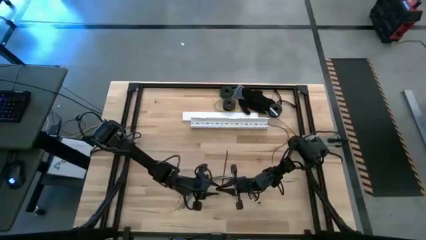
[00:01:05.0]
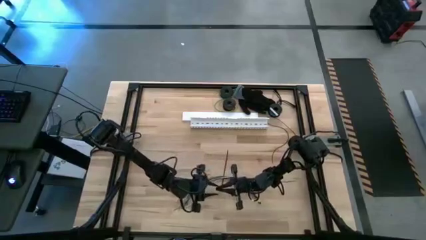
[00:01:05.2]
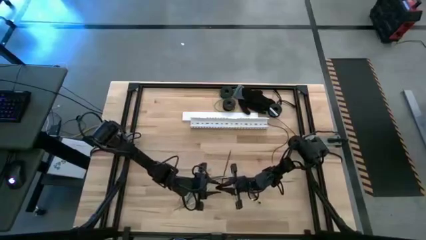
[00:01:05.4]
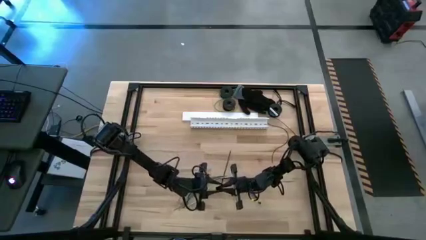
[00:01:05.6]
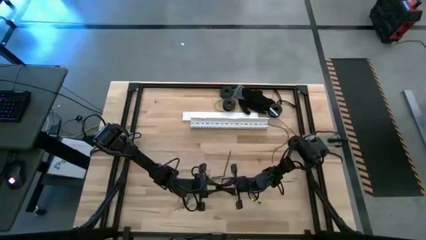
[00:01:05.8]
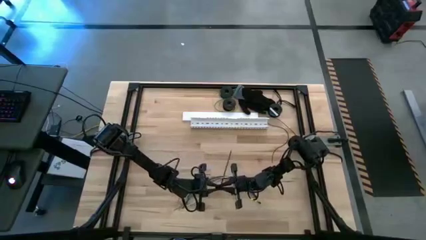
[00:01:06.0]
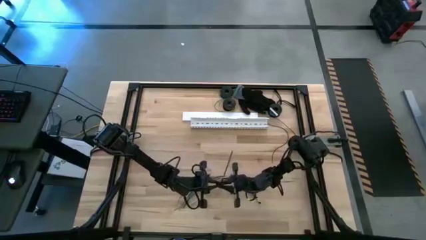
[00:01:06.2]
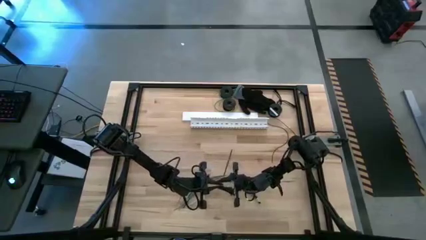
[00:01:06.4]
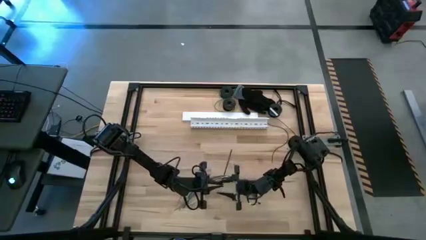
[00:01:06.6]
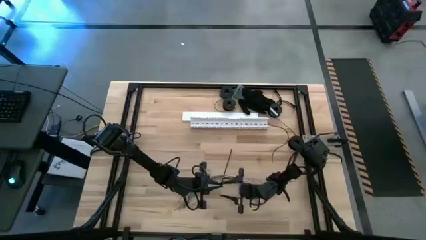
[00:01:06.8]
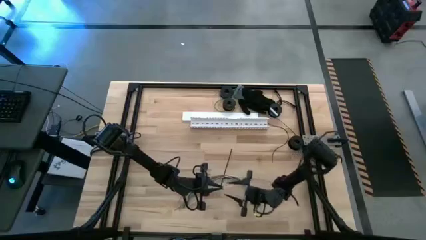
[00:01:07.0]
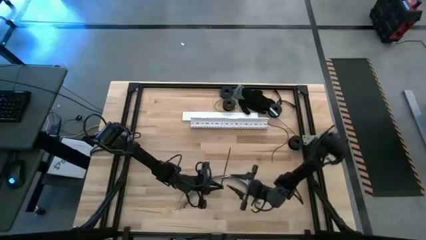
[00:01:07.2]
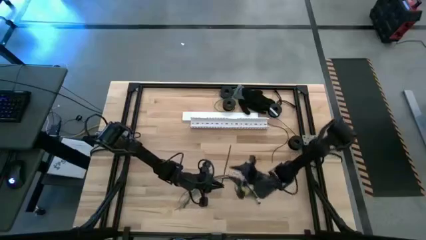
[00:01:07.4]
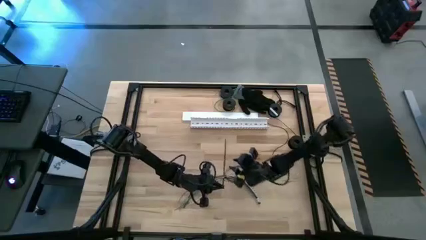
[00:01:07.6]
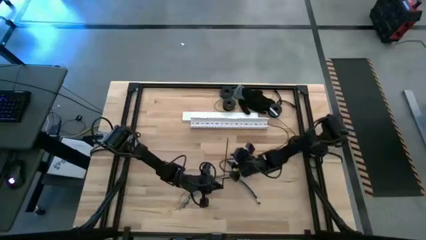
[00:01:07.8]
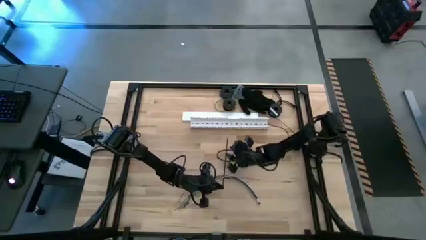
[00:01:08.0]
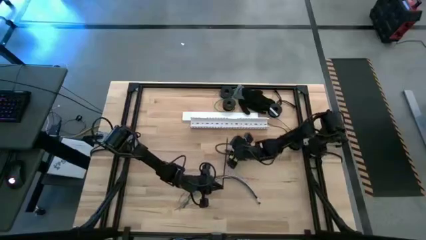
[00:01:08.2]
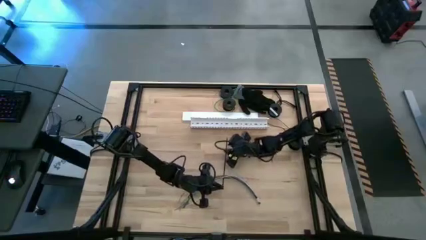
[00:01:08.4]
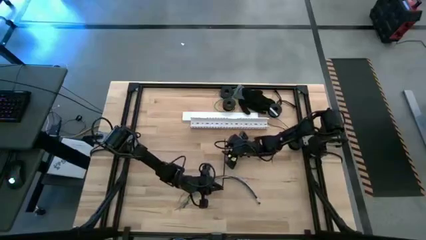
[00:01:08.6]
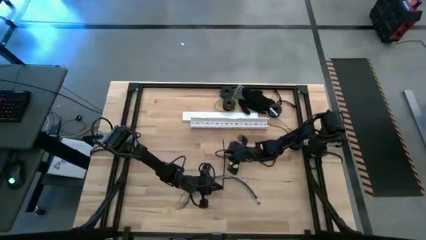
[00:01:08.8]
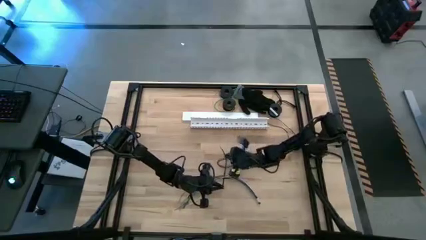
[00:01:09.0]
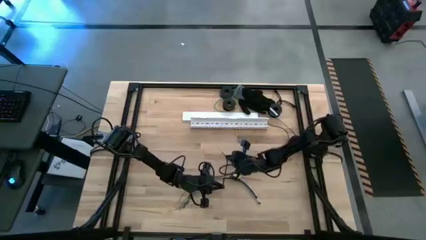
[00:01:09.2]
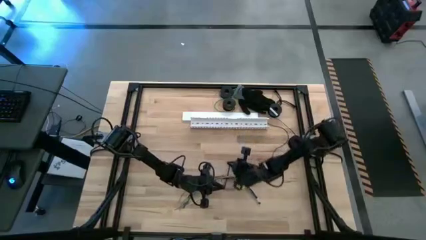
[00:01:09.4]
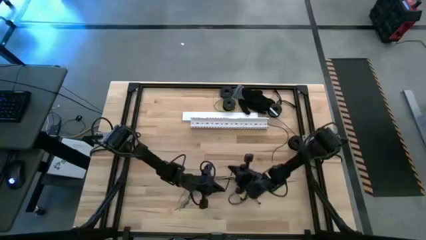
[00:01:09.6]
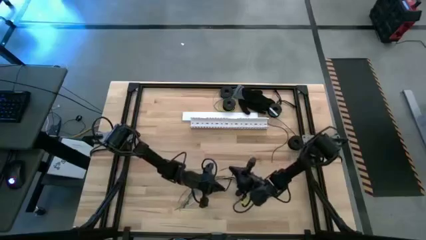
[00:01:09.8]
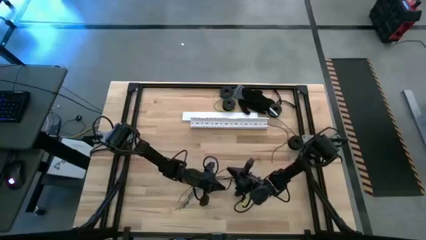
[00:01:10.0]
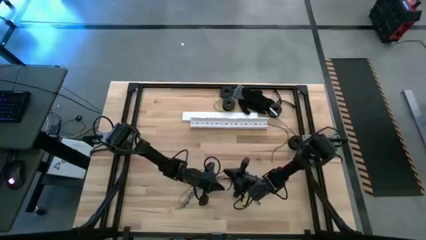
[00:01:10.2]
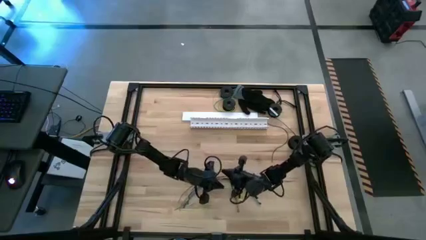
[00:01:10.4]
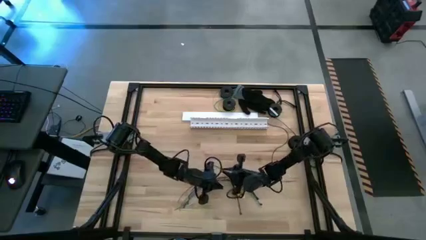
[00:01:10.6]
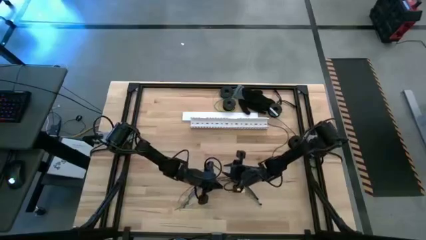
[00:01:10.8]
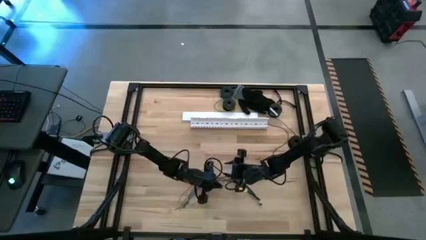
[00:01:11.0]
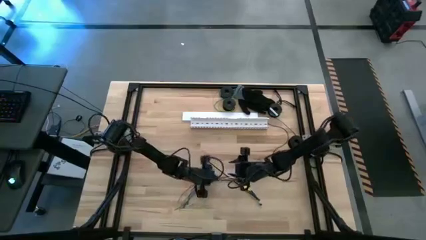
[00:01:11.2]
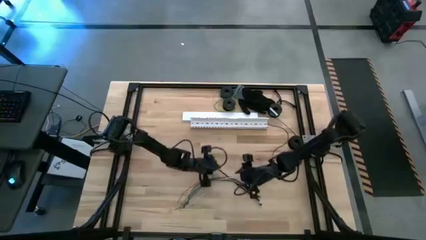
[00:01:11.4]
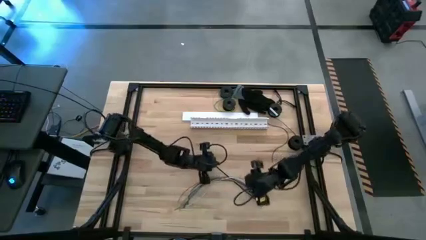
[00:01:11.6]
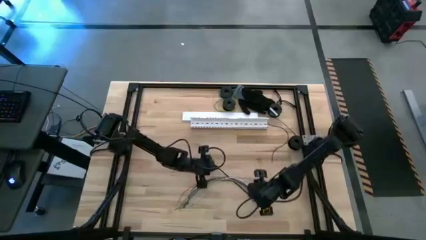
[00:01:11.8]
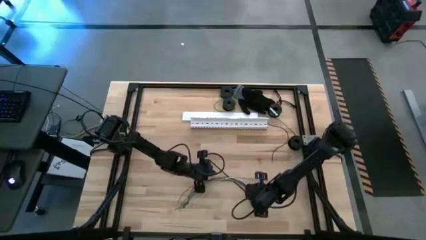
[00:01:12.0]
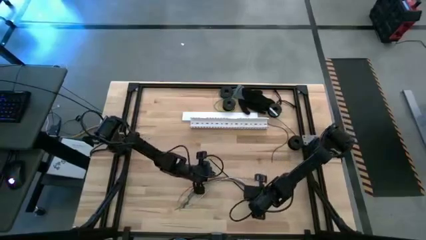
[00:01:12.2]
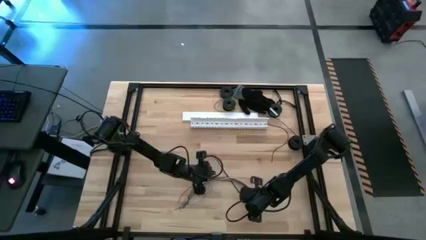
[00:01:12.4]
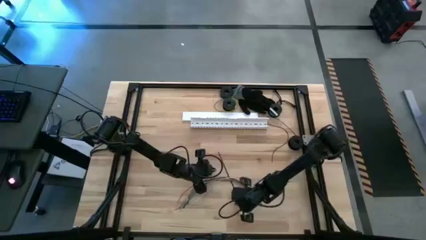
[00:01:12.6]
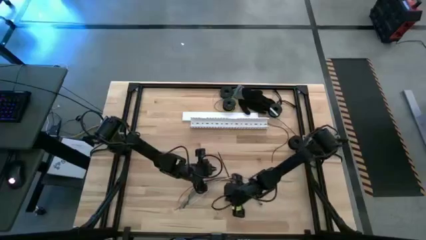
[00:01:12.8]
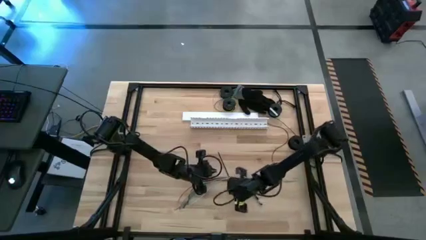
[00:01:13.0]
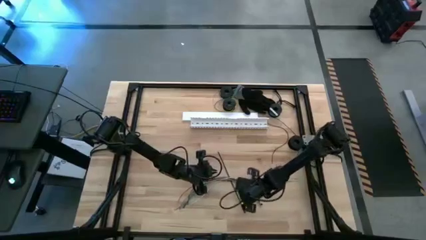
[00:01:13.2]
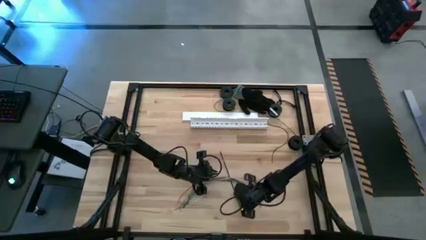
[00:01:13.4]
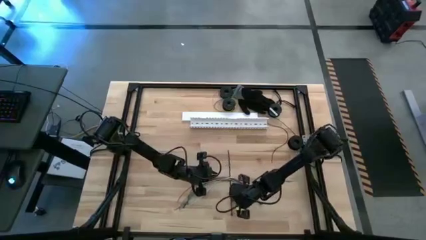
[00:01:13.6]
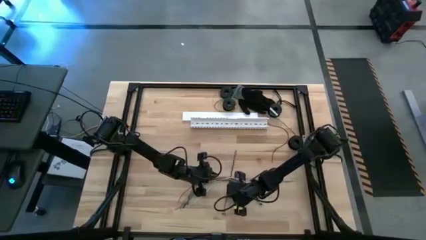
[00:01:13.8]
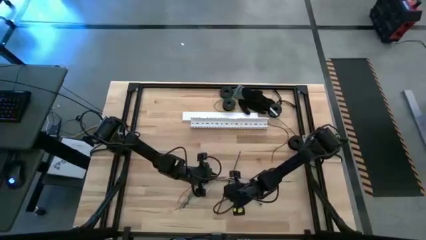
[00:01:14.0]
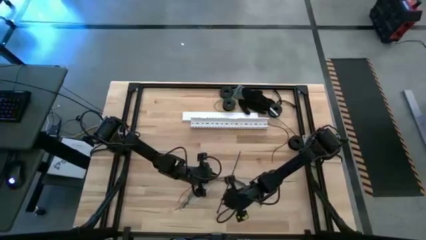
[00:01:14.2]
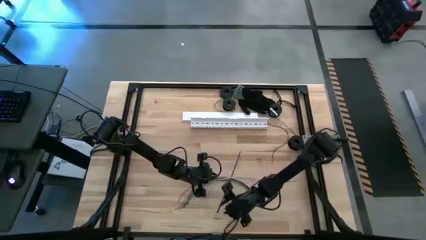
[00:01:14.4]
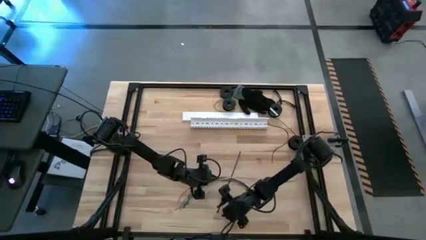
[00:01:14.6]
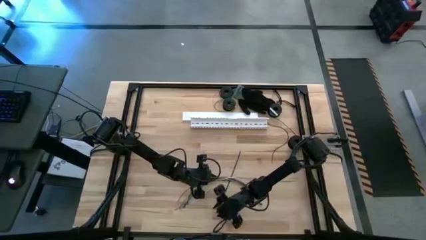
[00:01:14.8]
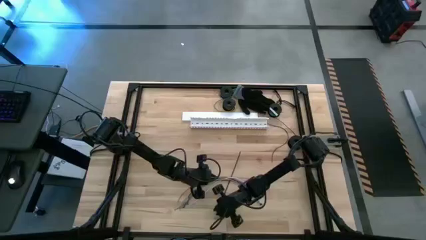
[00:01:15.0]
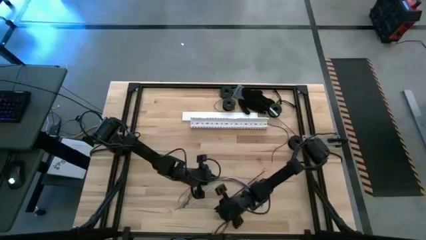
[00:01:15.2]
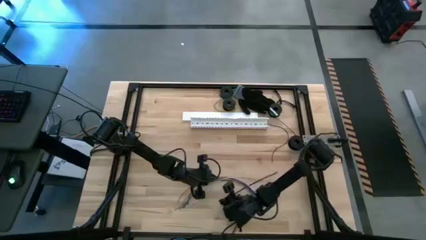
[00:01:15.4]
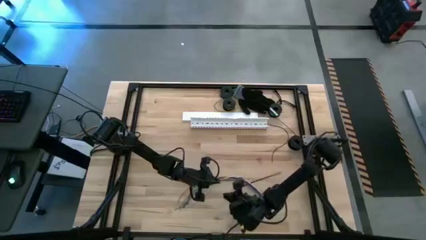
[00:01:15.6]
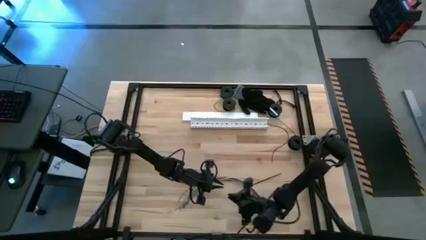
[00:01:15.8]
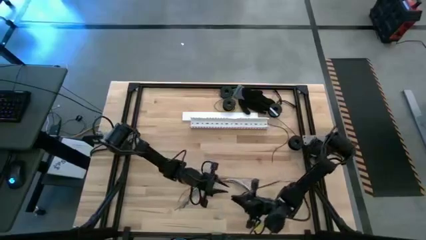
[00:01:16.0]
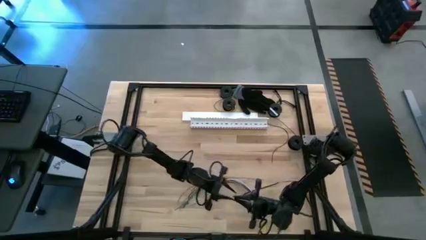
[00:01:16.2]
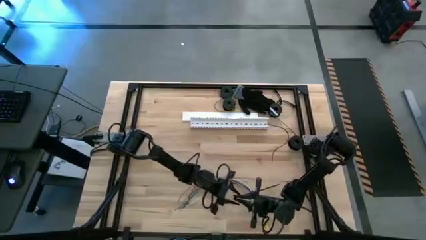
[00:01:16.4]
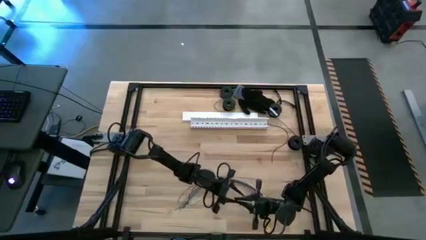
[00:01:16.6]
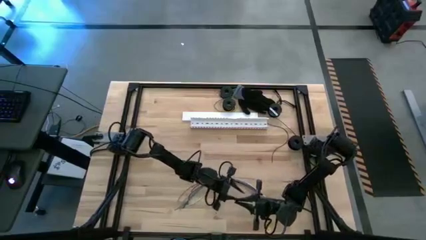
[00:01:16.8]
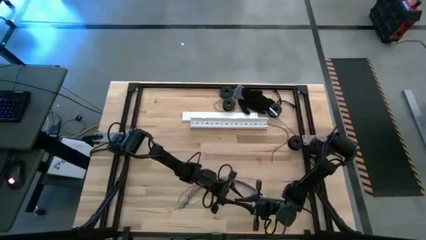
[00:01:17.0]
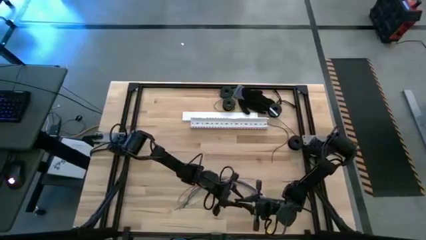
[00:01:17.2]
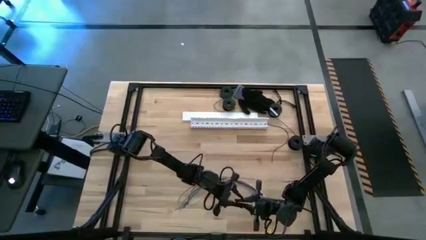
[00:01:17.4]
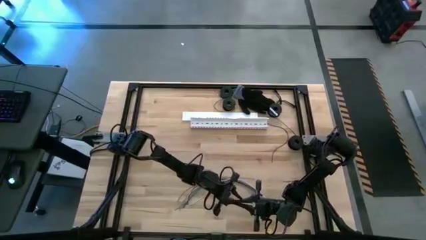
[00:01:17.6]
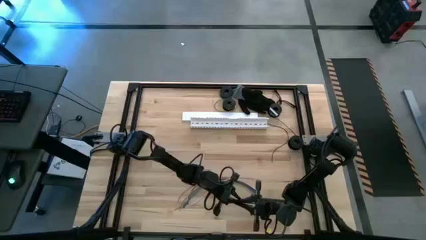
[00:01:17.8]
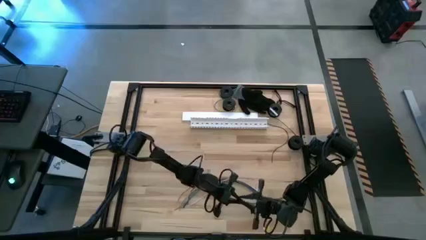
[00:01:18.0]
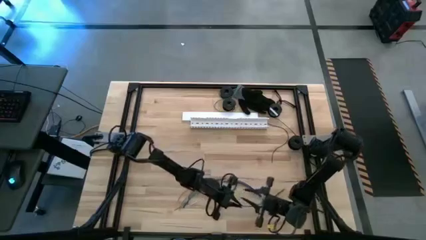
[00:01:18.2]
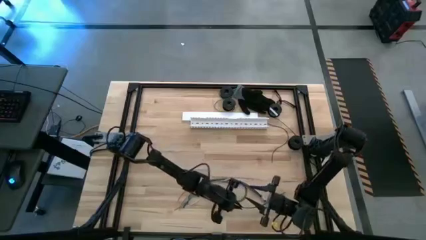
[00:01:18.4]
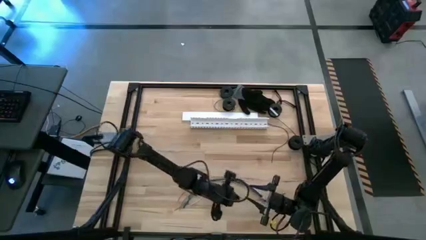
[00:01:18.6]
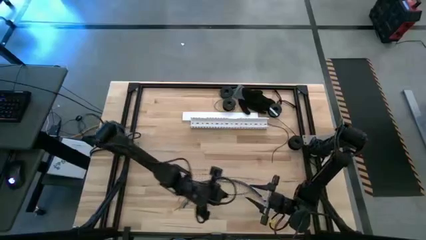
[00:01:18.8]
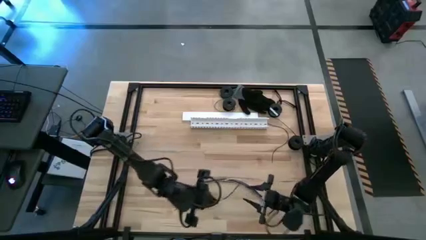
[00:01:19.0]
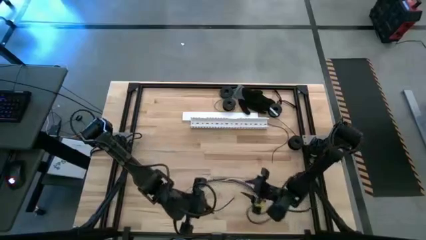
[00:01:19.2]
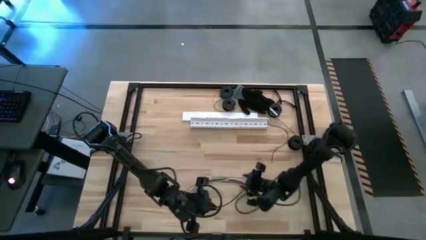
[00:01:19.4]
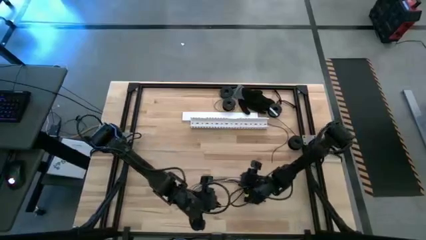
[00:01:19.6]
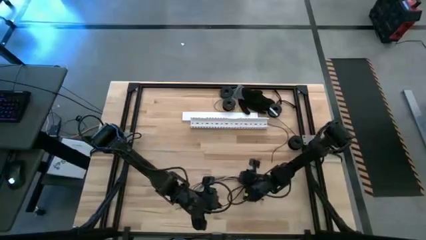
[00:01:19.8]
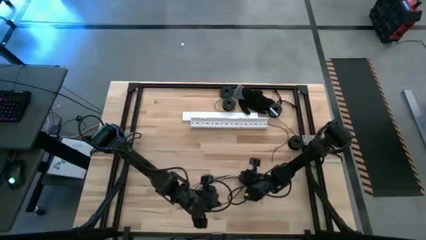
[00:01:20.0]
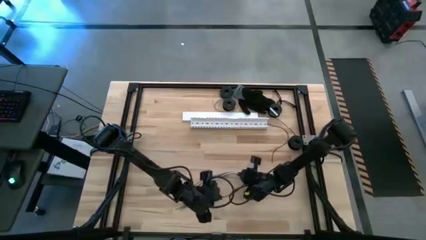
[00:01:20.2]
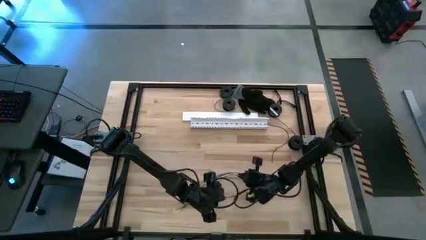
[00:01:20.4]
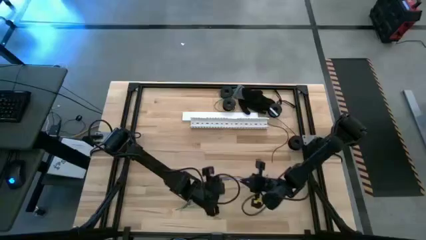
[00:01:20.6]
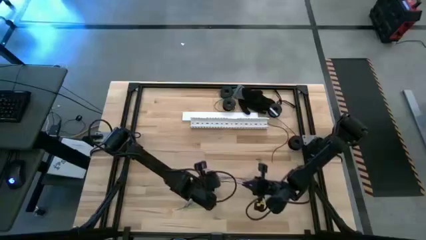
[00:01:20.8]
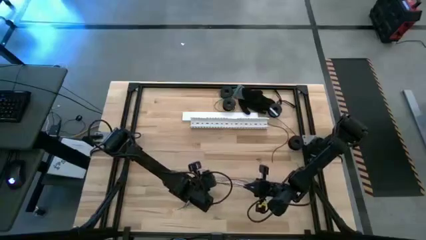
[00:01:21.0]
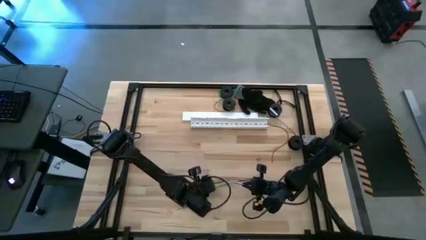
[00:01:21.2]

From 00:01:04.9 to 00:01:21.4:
Task: Ziptie cables
Wrap the cables together using a black zip tie

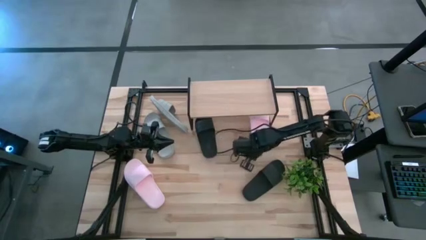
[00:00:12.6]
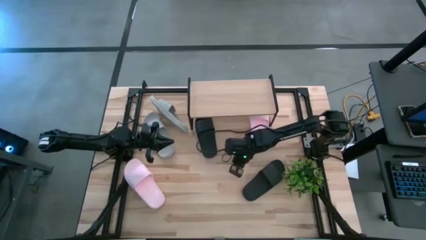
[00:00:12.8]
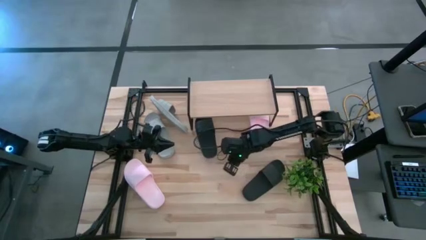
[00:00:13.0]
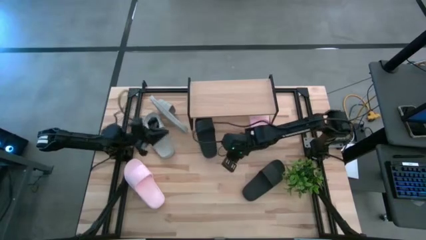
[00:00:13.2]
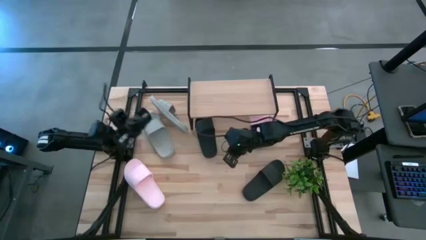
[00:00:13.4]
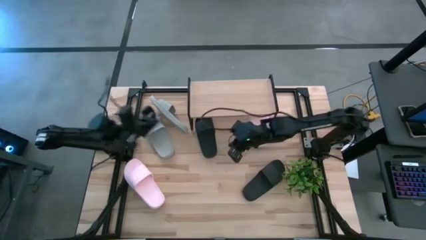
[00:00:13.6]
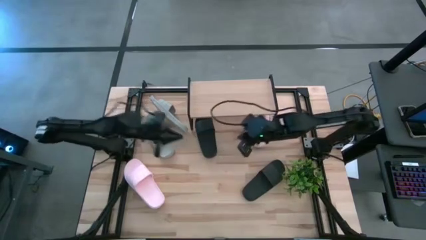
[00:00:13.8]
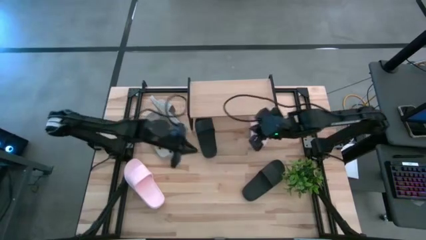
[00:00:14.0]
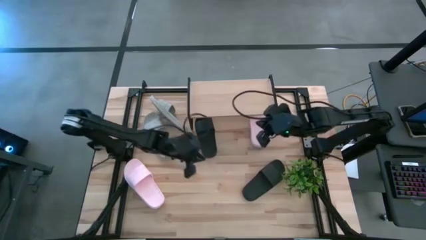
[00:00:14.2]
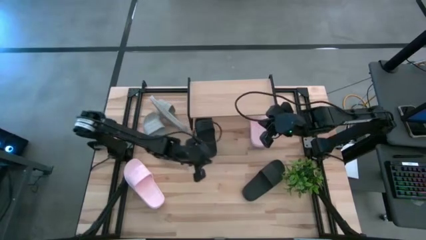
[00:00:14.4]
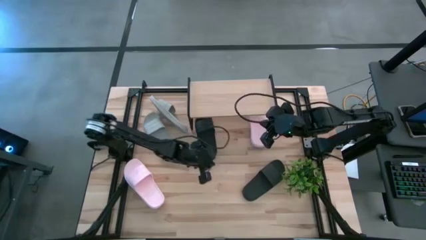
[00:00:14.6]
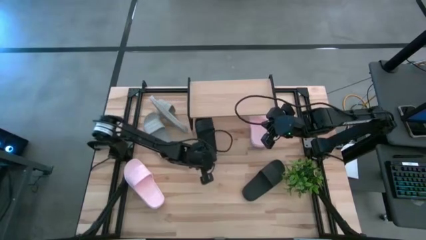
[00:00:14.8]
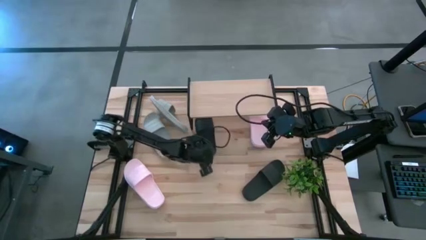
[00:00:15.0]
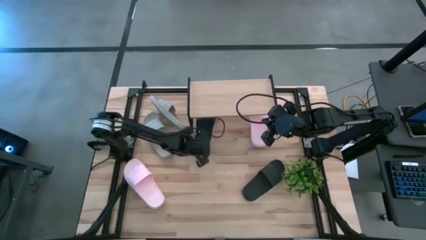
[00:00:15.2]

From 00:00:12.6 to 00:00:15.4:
Task: Pick and place slides into the shelf
Adjust the black slide under the shelf
